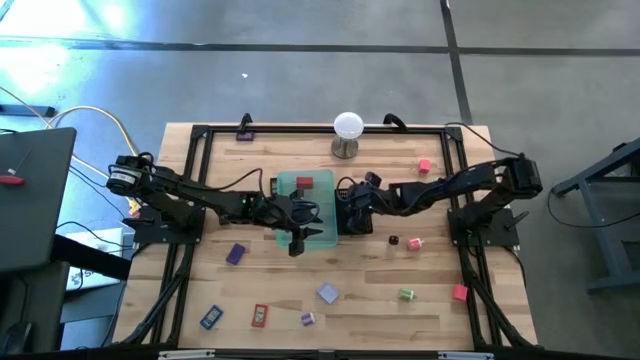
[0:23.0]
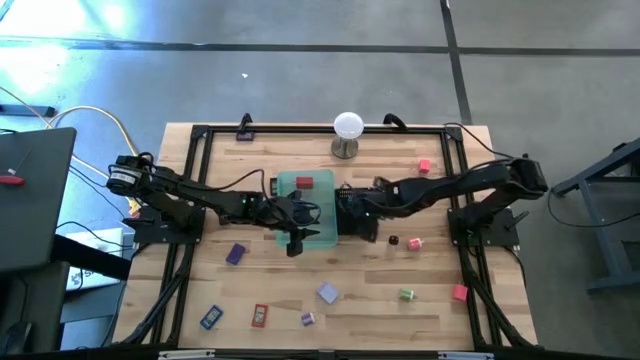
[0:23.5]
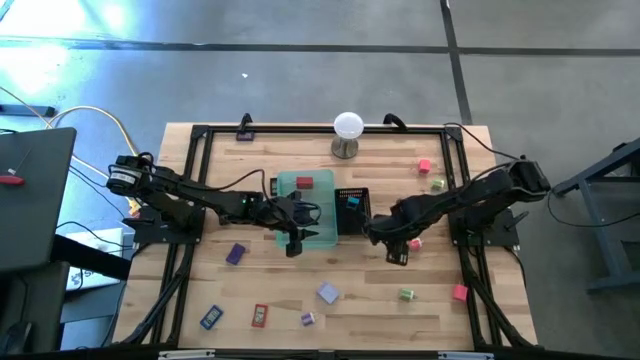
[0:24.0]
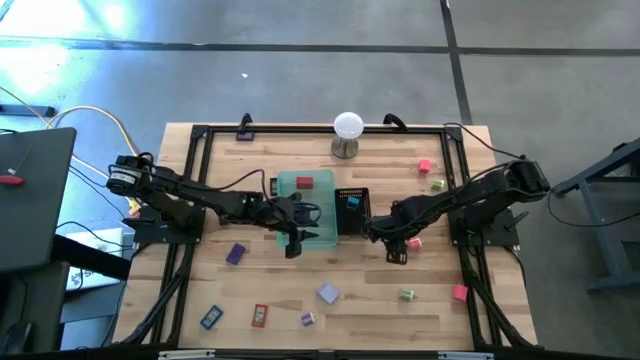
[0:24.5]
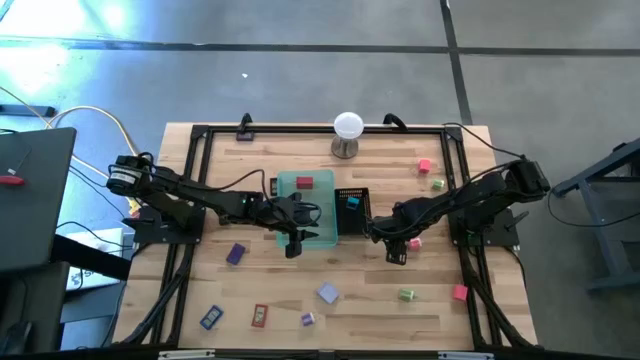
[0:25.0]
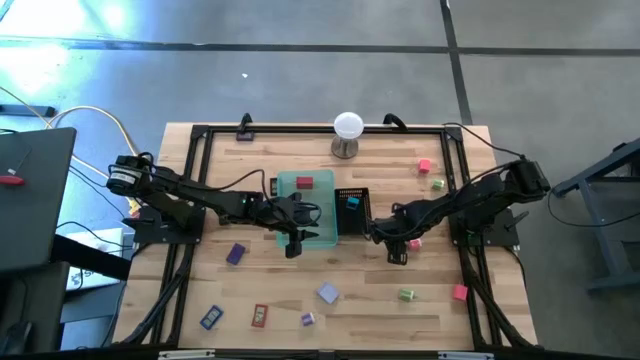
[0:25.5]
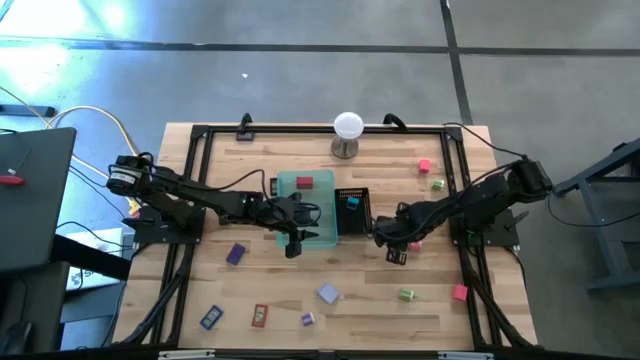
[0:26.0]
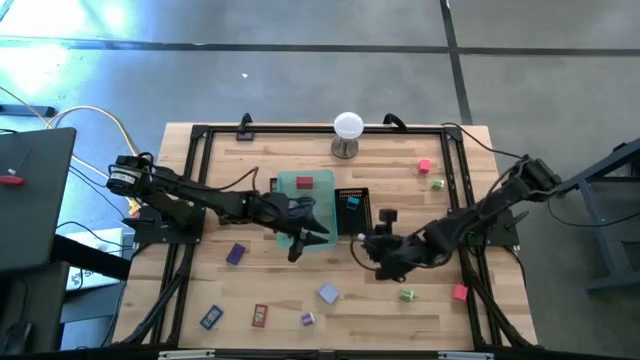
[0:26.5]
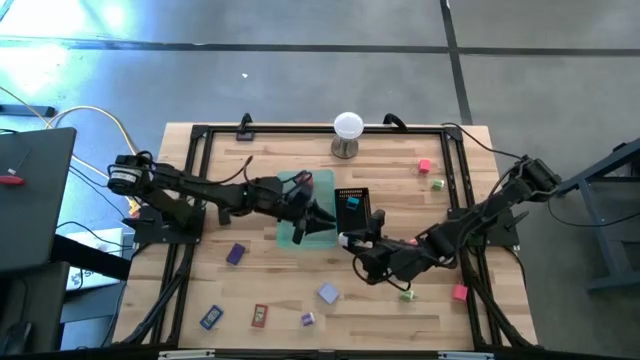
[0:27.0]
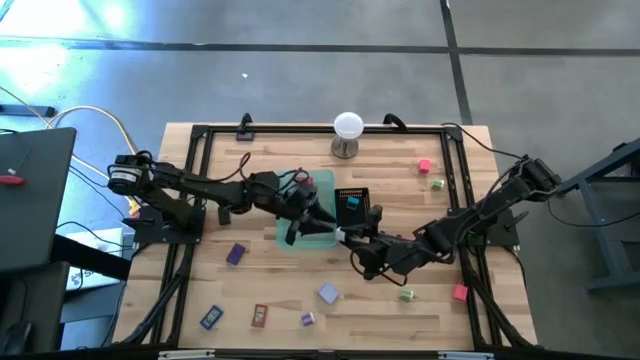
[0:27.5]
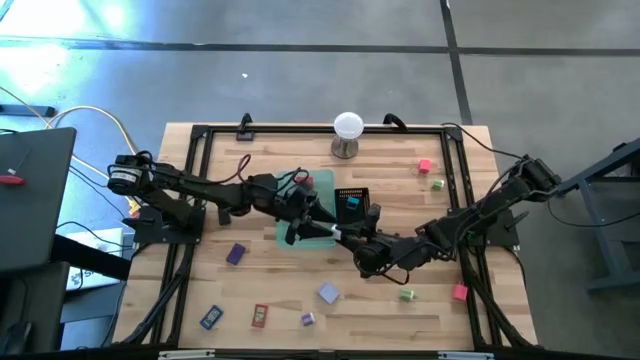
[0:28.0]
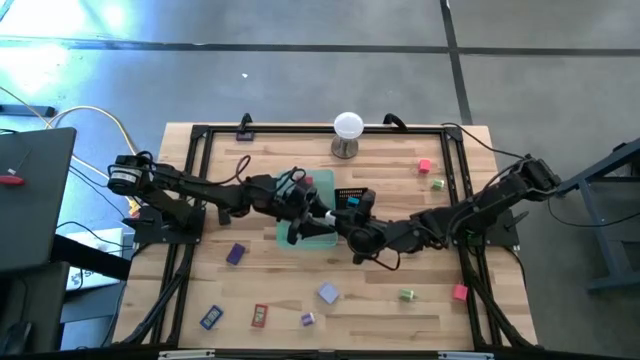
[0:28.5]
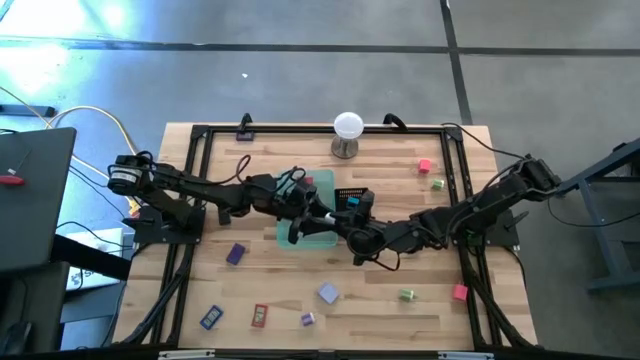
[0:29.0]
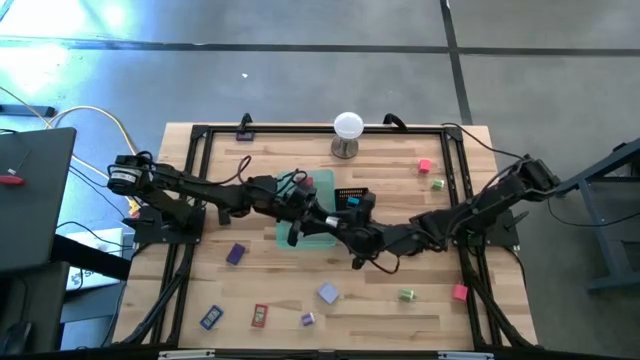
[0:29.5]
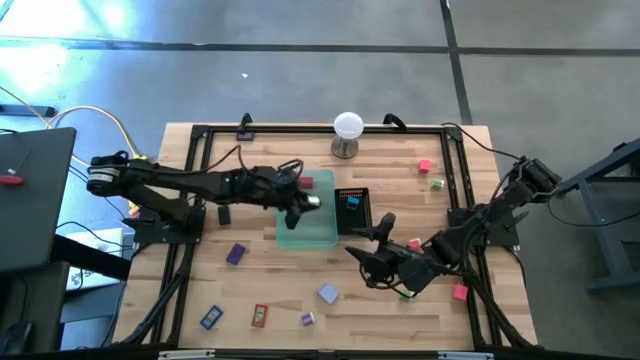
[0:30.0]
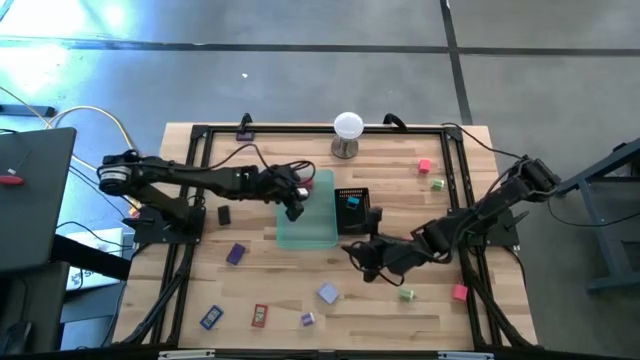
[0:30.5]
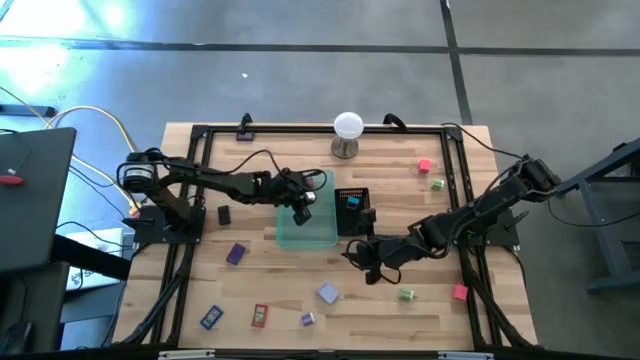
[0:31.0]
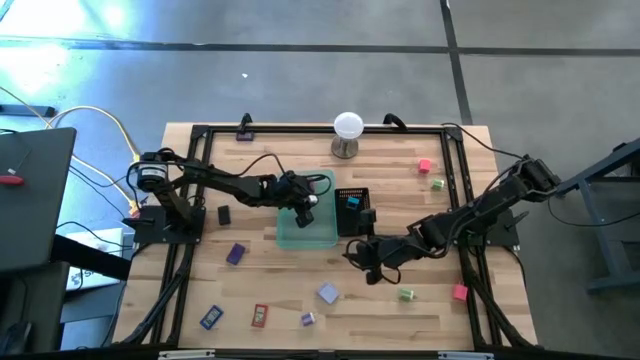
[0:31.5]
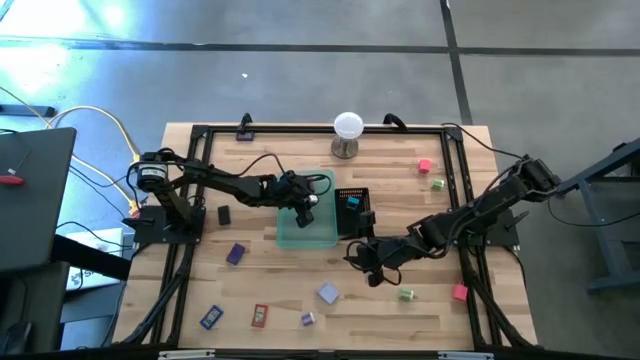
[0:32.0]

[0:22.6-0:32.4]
Task: Pick & Place Office items
Put the white charger adapter into the blue bin

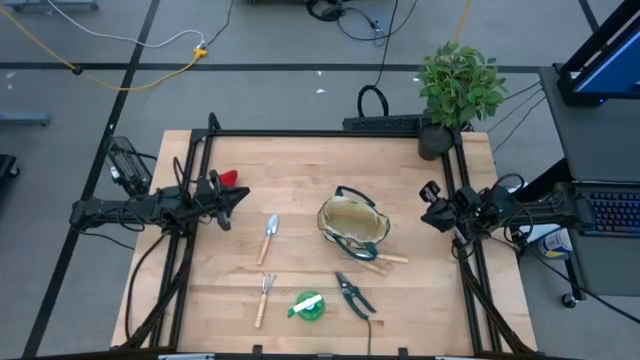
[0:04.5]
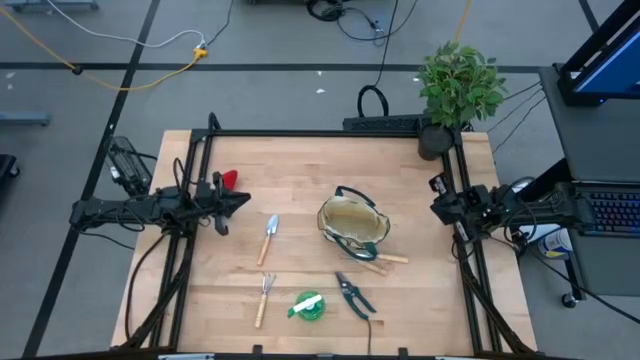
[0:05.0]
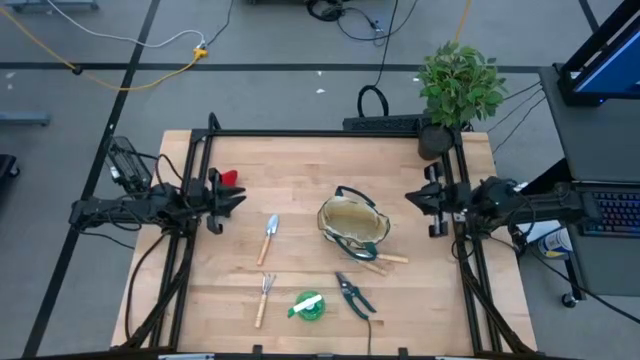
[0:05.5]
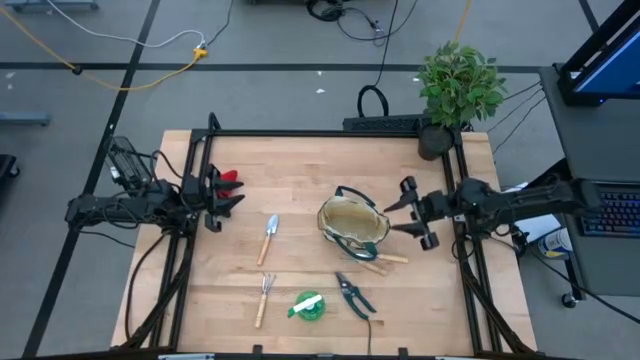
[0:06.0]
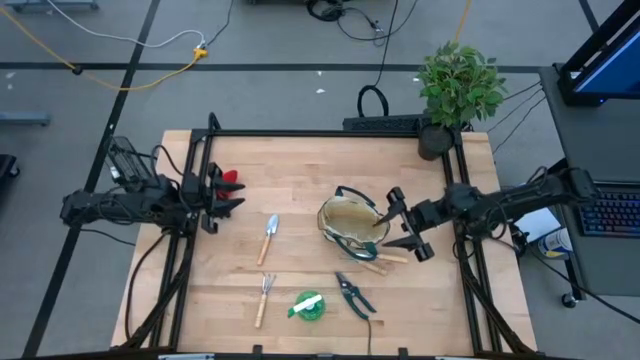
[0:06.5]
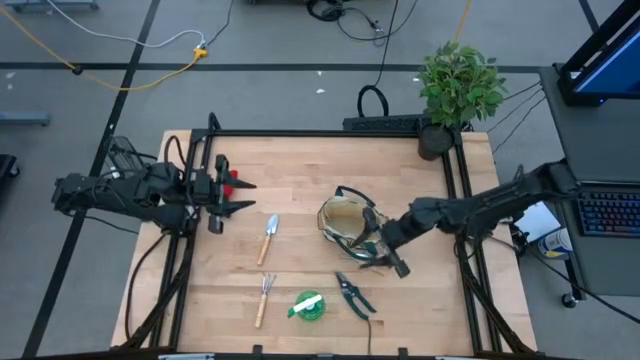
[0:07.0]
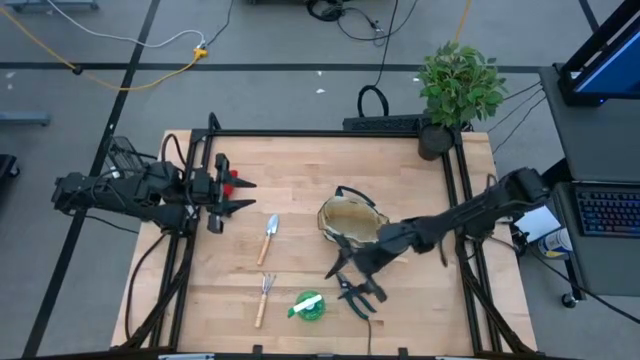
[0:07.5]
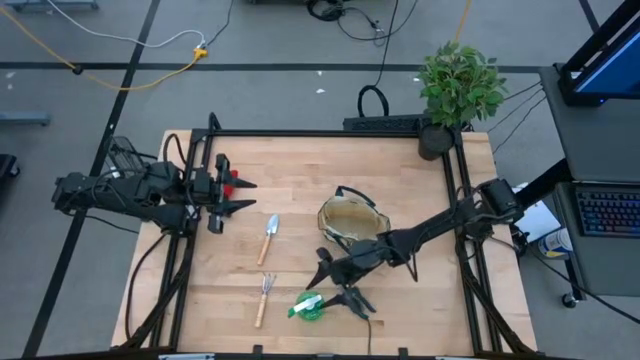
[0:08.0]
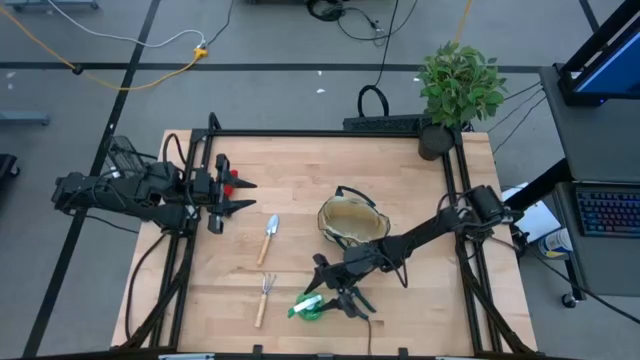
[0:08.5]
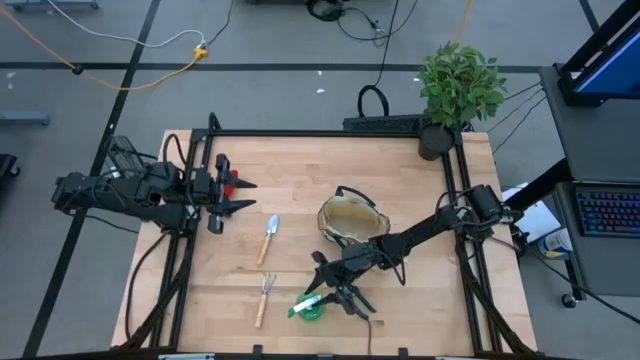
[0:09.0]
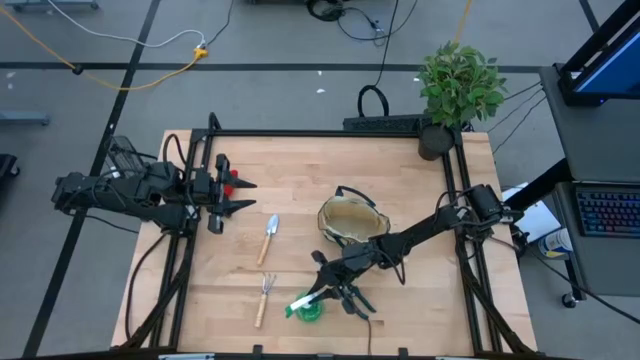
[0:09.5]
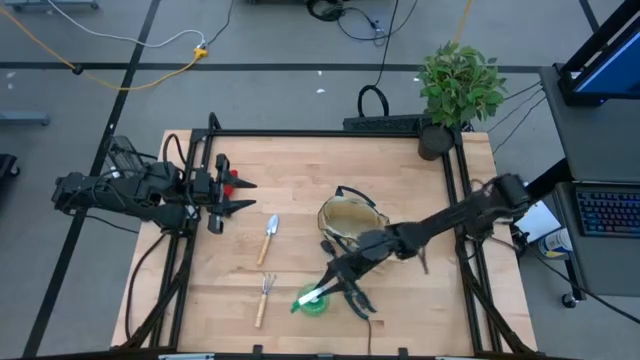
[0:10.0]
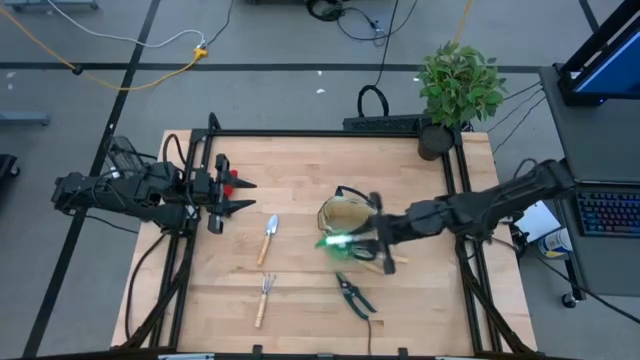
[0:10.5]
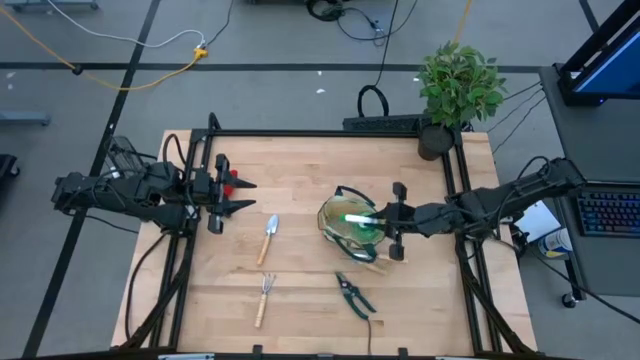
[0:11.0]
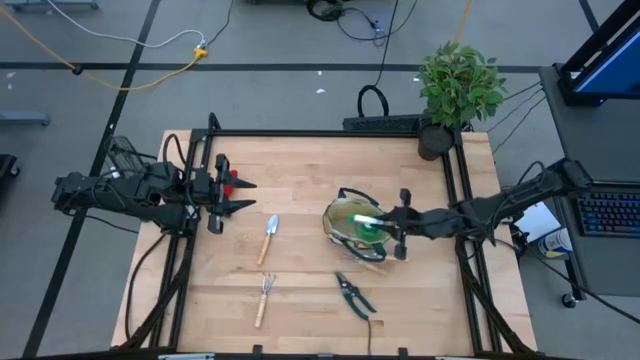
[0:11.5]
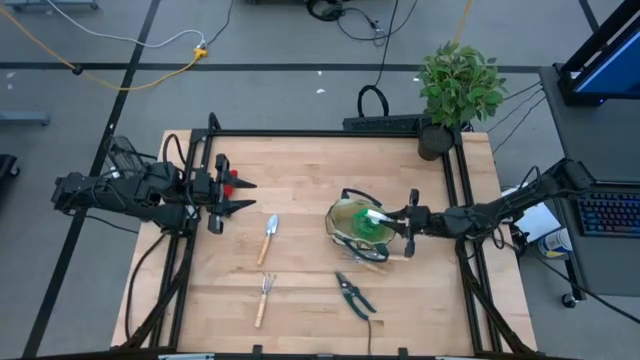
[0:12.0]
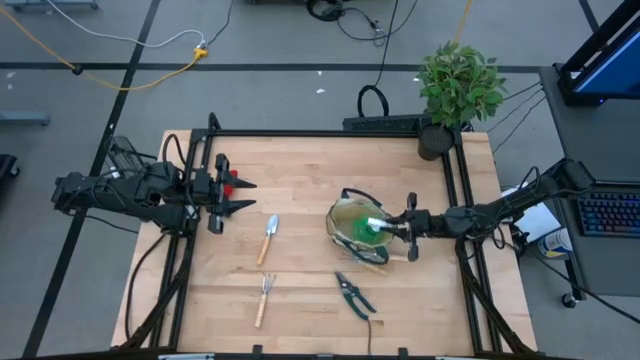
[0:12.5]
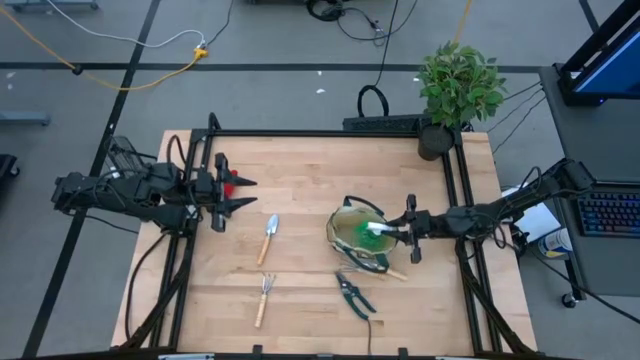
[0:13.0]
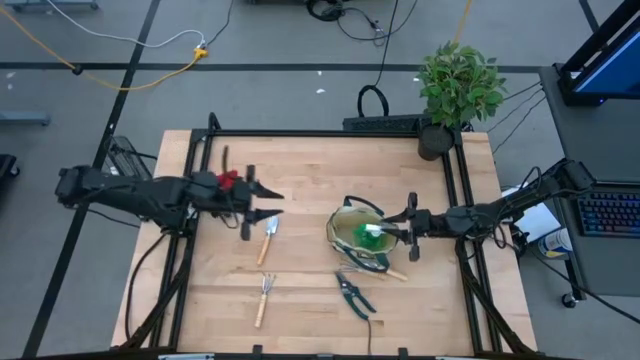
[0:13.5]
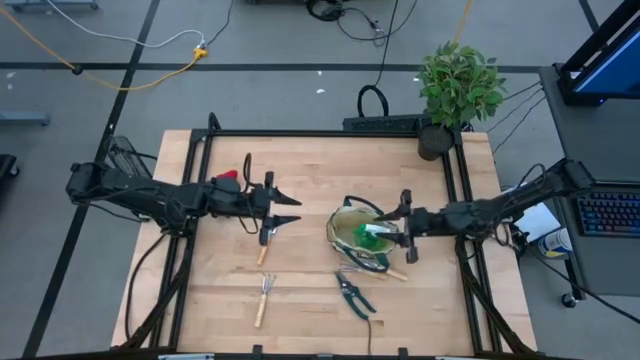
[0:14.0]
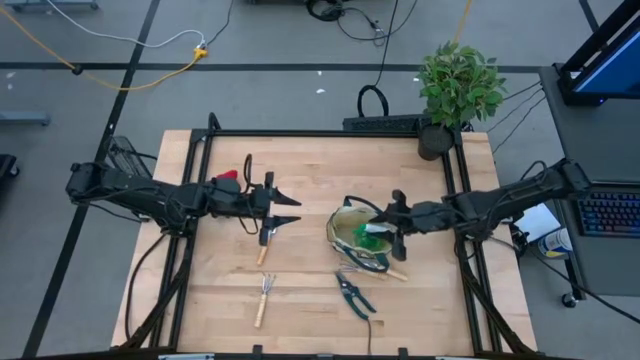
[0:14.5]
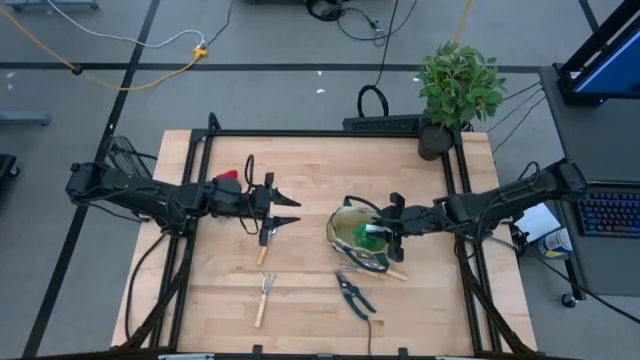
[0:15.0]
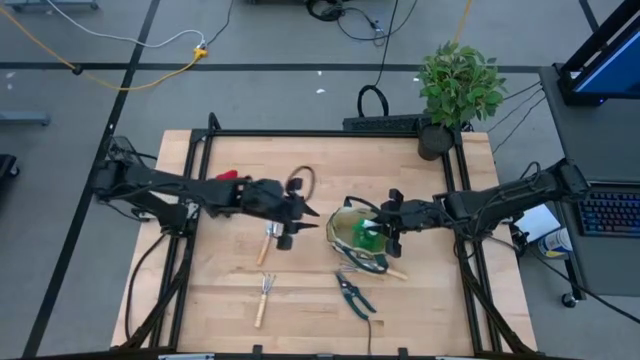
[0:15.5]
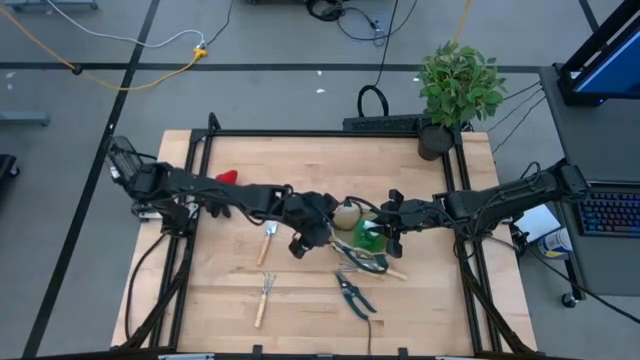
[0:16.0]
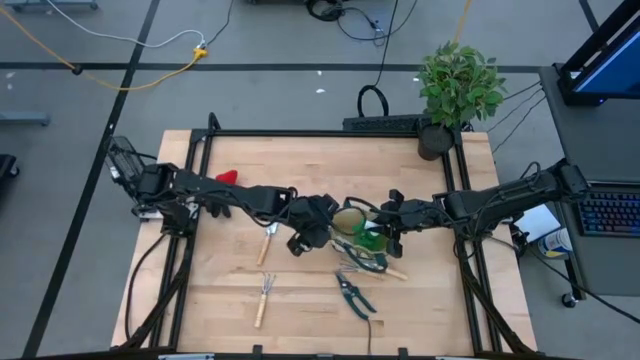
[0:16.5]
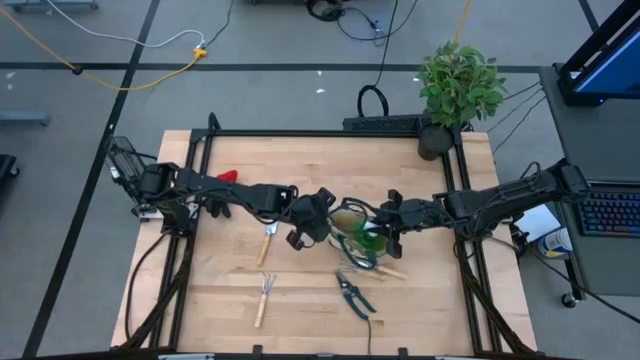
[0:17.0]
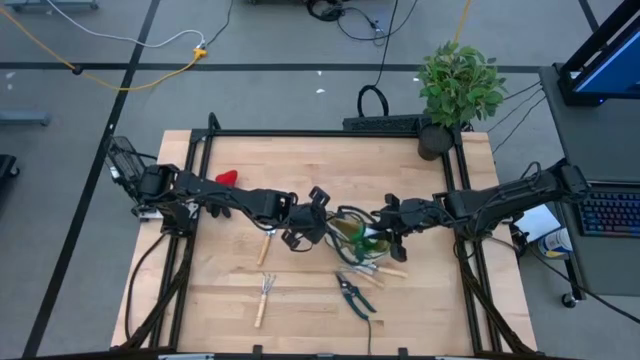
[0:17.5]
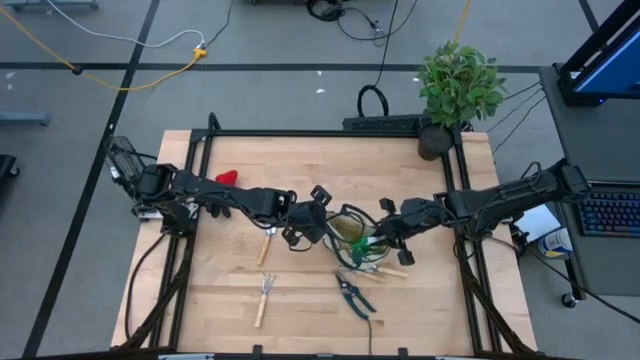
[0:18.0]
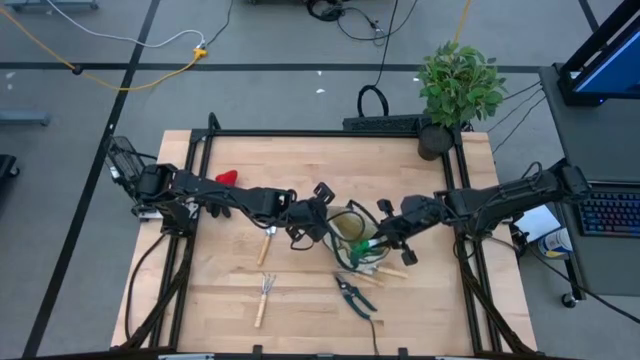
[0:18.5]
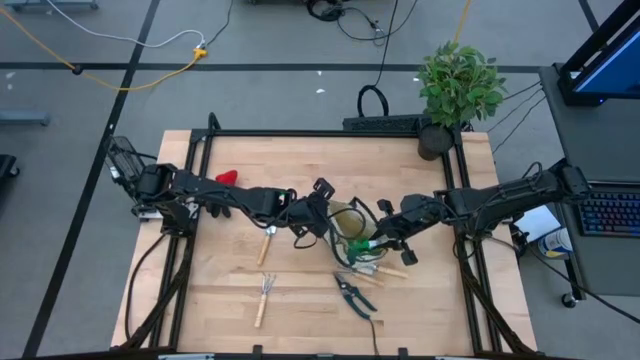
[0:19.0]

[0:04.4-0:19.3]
Task: Pick & Place Garden tools in Gardening bag
Put the green spray bottle into the white gardening bag
